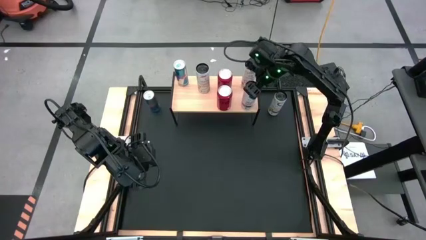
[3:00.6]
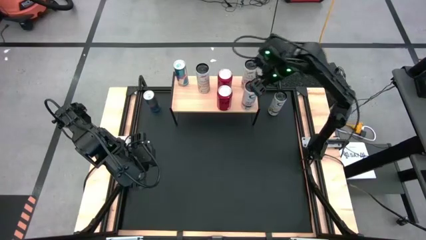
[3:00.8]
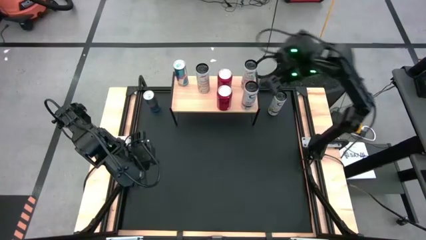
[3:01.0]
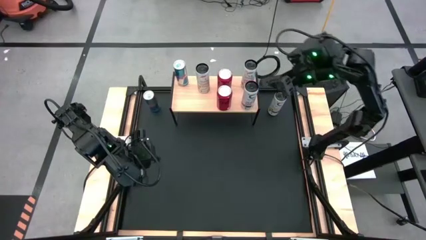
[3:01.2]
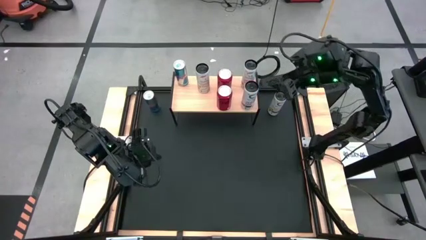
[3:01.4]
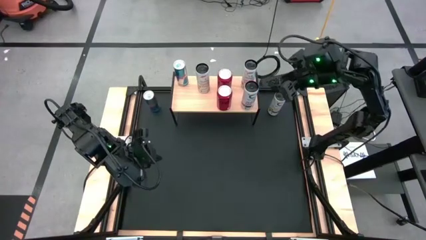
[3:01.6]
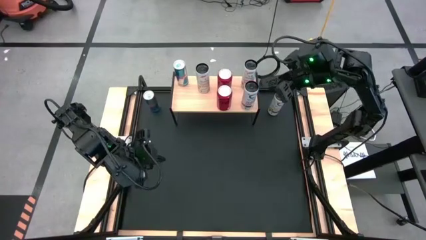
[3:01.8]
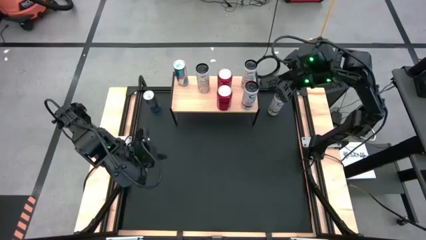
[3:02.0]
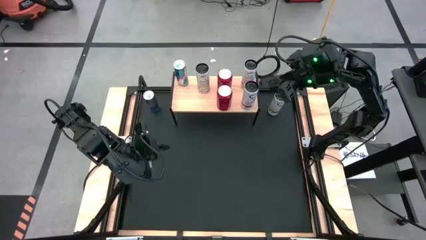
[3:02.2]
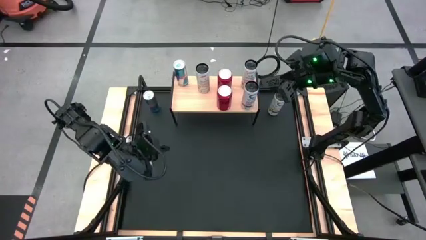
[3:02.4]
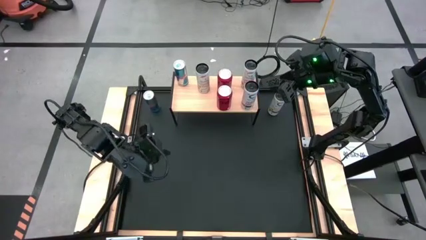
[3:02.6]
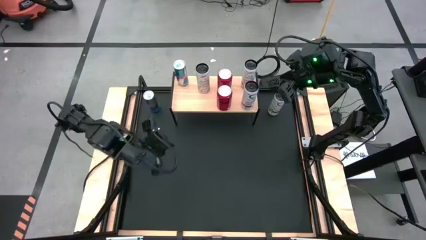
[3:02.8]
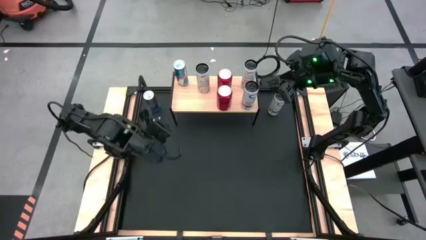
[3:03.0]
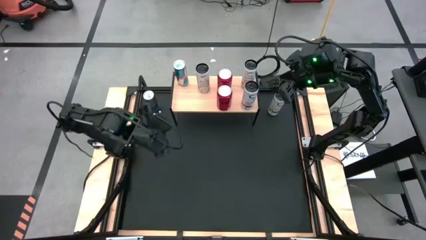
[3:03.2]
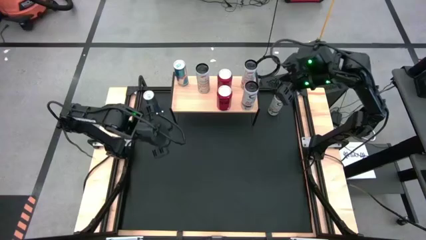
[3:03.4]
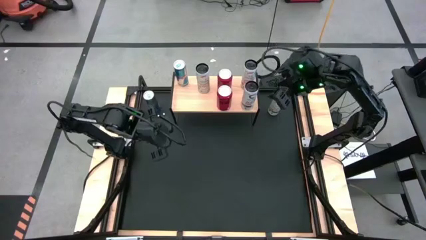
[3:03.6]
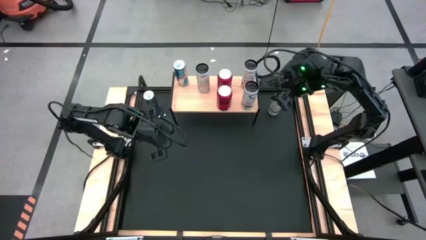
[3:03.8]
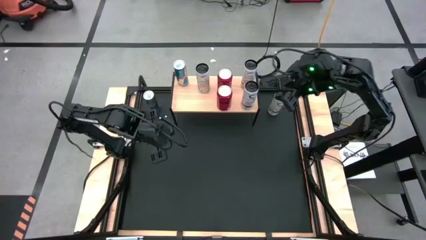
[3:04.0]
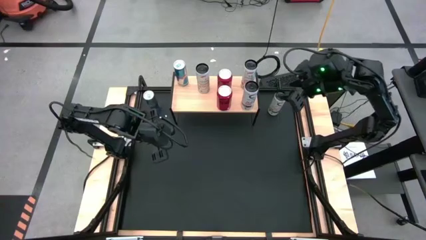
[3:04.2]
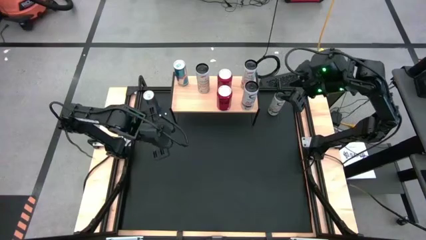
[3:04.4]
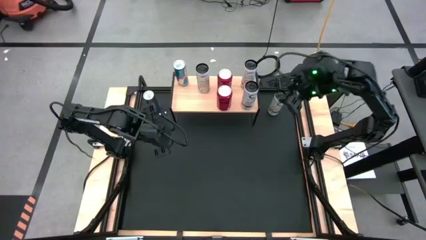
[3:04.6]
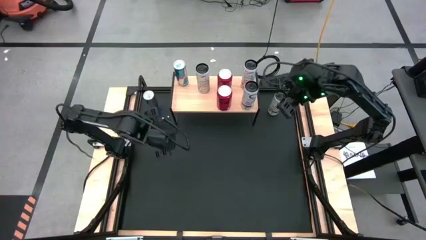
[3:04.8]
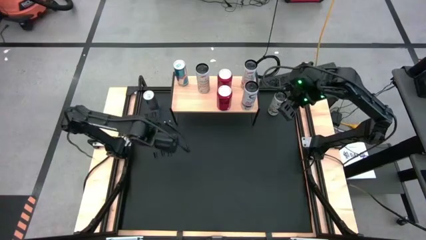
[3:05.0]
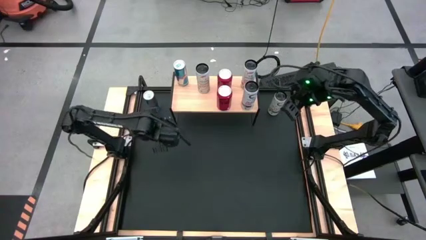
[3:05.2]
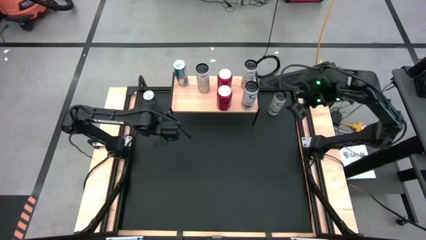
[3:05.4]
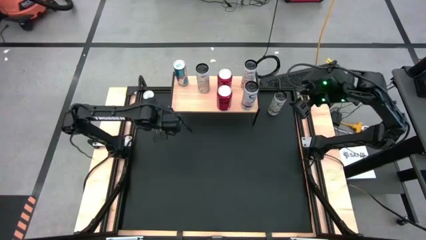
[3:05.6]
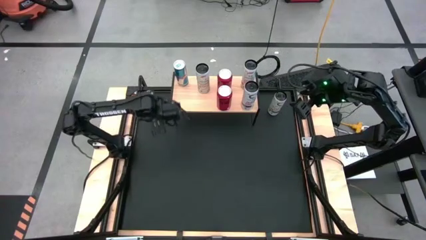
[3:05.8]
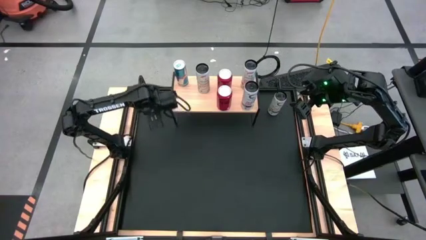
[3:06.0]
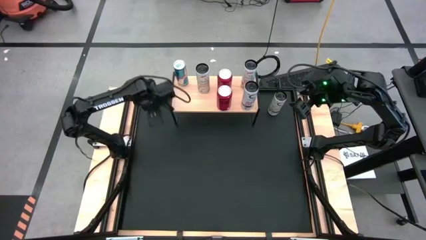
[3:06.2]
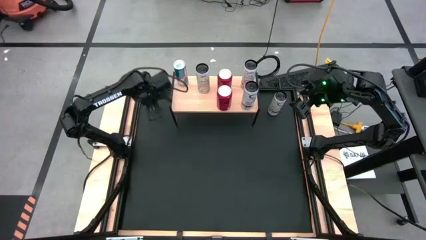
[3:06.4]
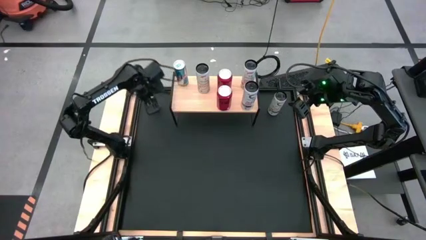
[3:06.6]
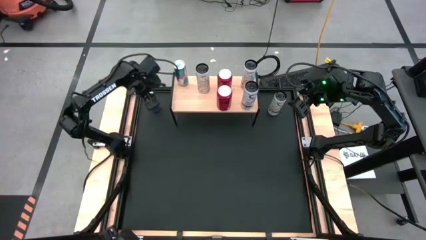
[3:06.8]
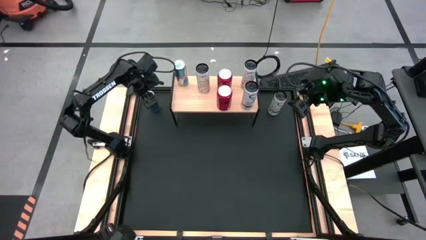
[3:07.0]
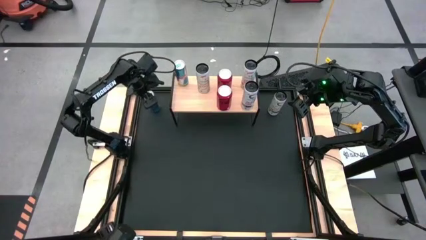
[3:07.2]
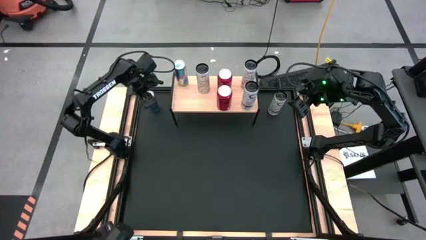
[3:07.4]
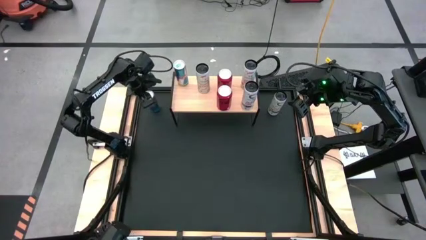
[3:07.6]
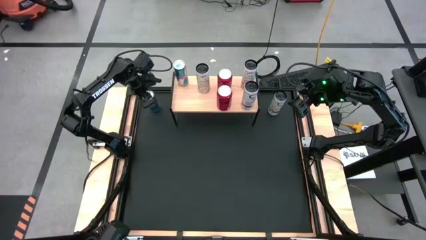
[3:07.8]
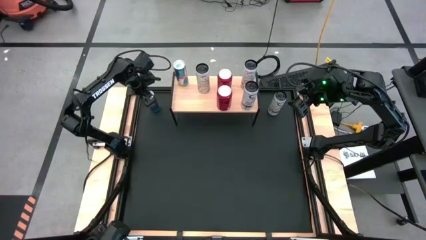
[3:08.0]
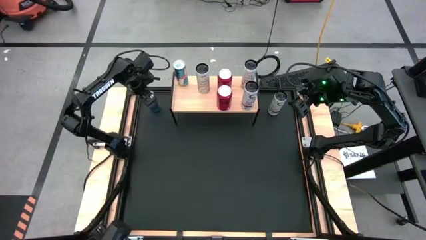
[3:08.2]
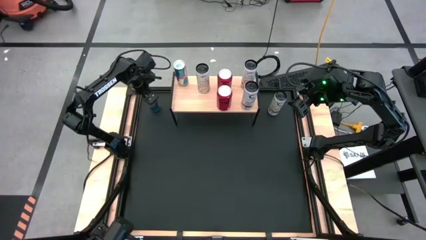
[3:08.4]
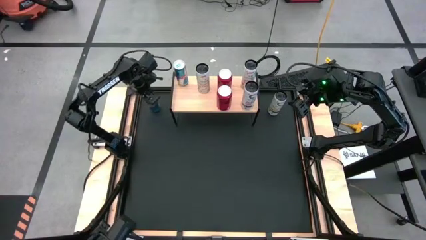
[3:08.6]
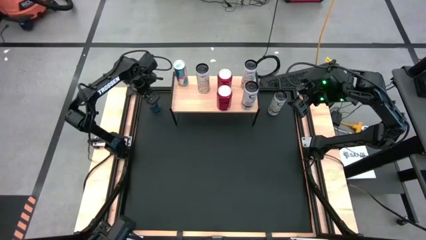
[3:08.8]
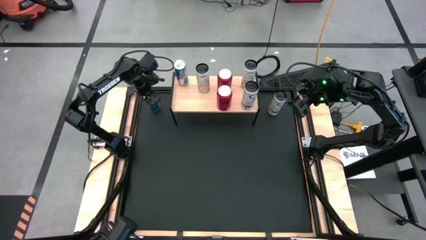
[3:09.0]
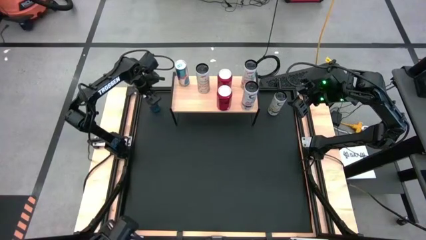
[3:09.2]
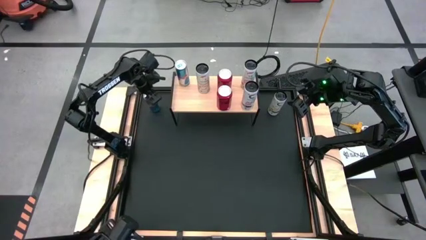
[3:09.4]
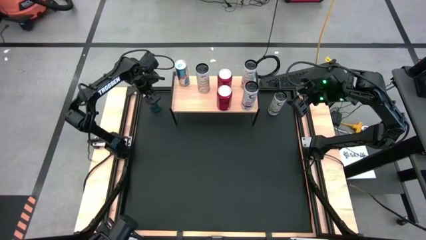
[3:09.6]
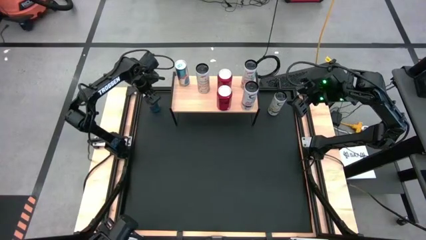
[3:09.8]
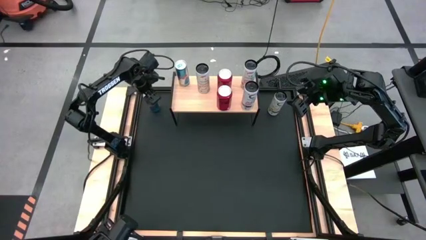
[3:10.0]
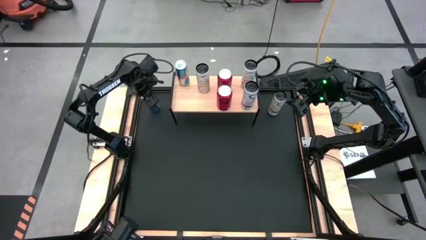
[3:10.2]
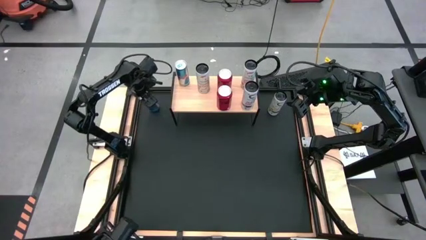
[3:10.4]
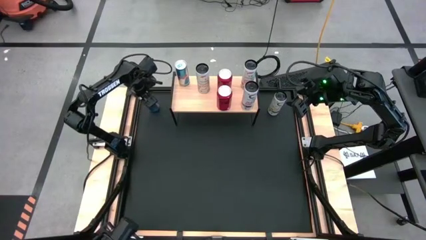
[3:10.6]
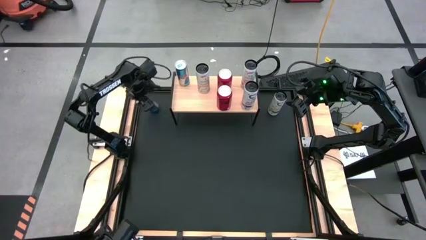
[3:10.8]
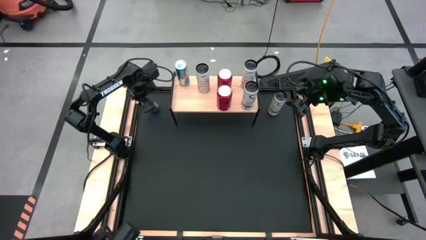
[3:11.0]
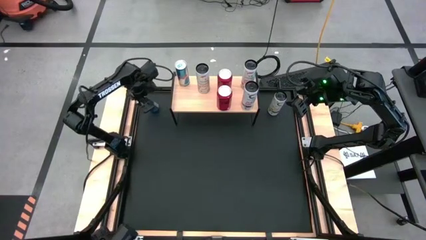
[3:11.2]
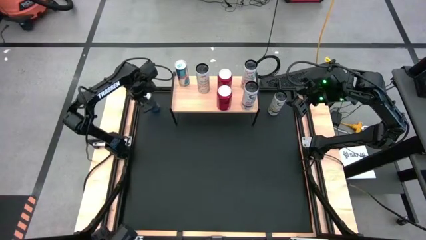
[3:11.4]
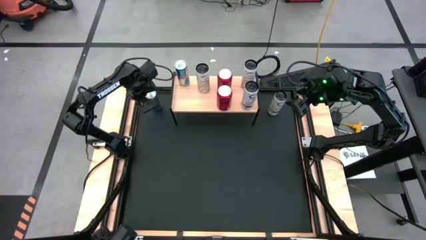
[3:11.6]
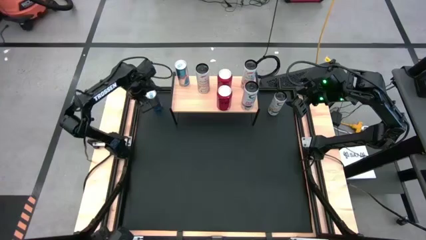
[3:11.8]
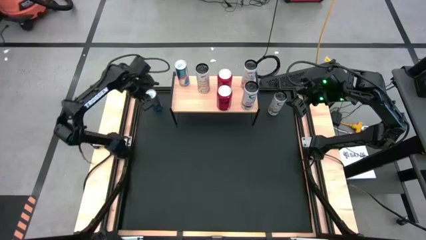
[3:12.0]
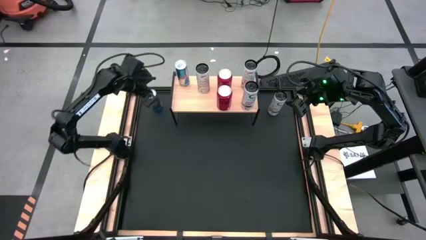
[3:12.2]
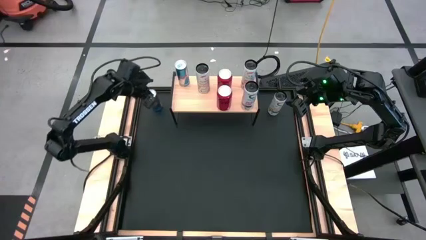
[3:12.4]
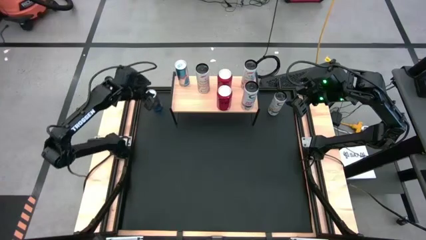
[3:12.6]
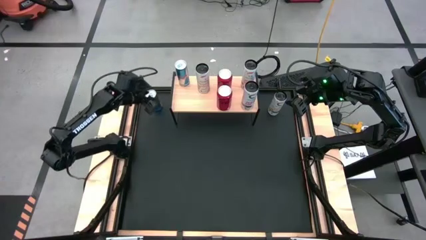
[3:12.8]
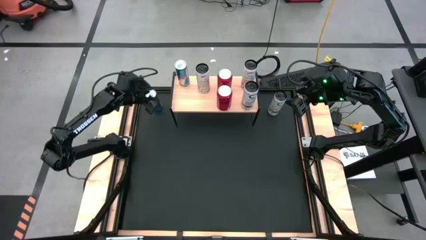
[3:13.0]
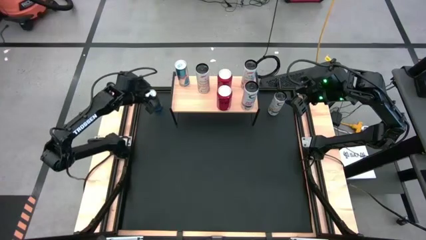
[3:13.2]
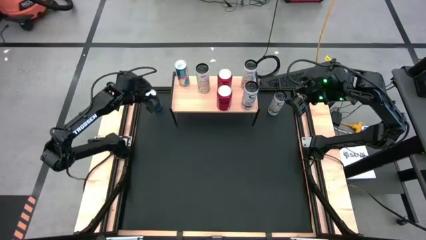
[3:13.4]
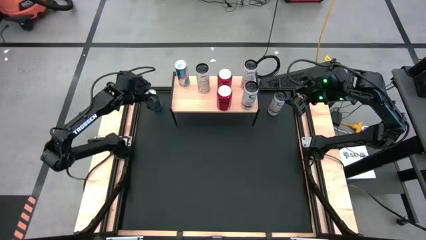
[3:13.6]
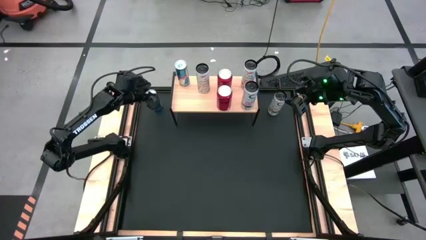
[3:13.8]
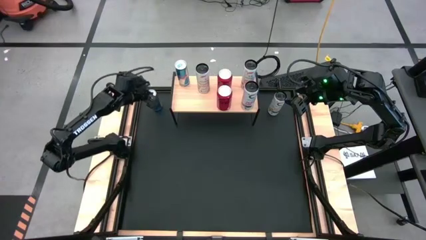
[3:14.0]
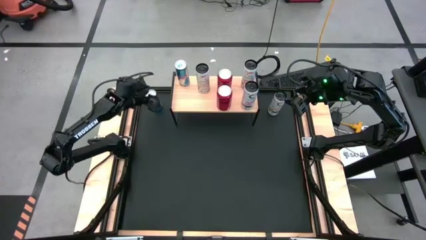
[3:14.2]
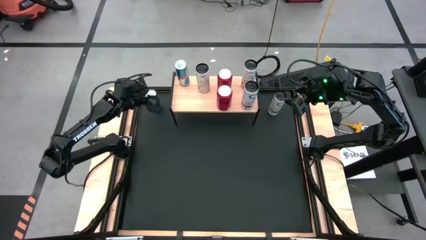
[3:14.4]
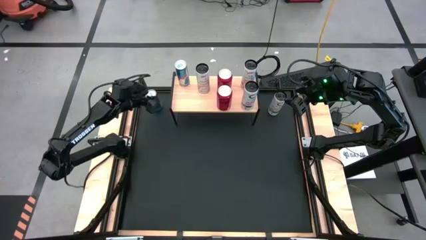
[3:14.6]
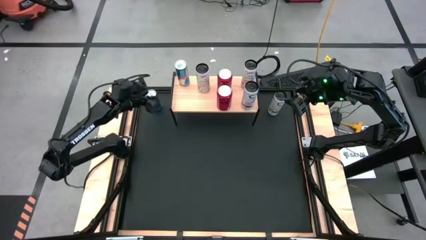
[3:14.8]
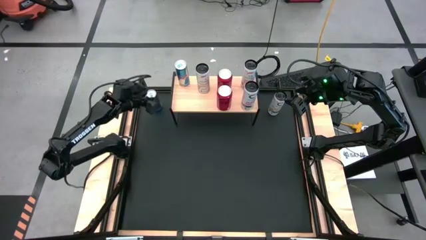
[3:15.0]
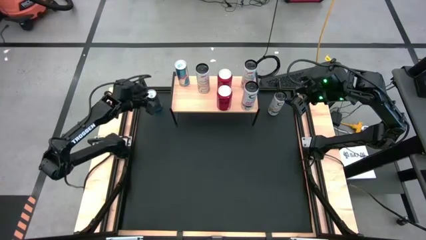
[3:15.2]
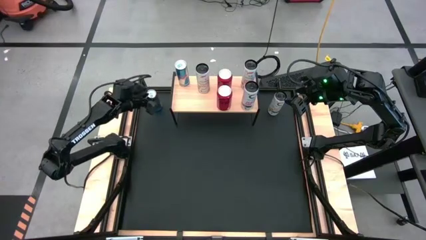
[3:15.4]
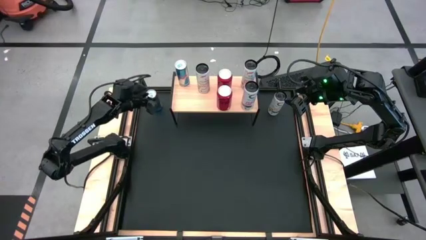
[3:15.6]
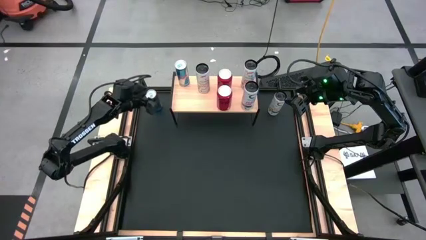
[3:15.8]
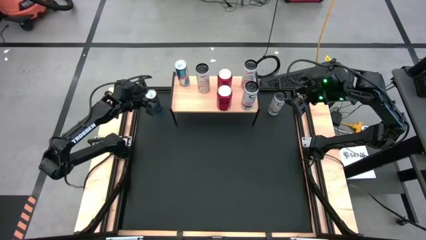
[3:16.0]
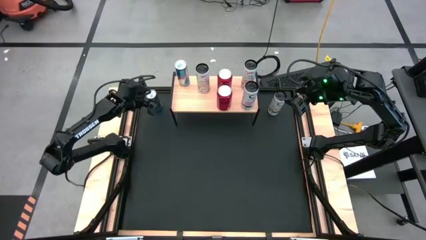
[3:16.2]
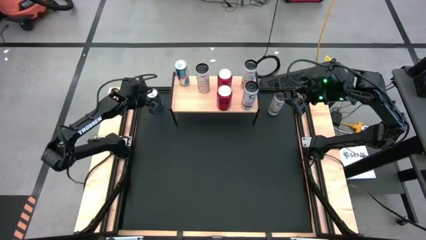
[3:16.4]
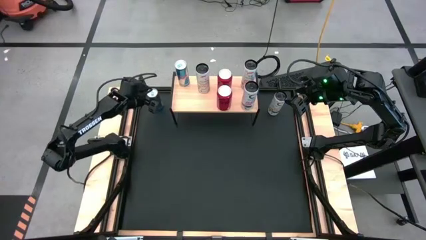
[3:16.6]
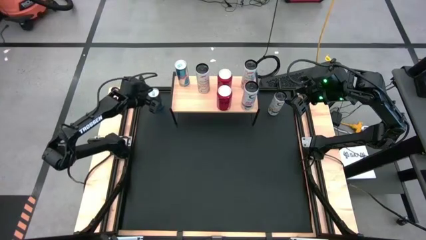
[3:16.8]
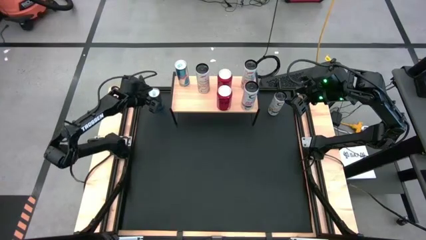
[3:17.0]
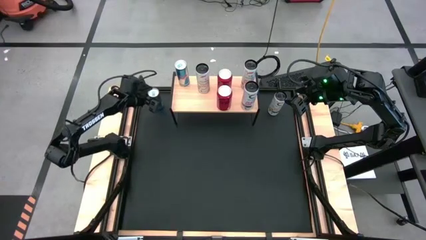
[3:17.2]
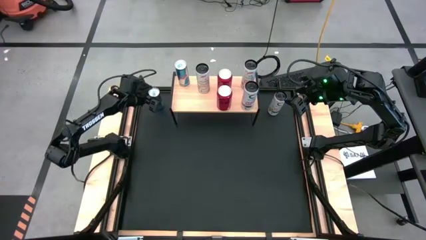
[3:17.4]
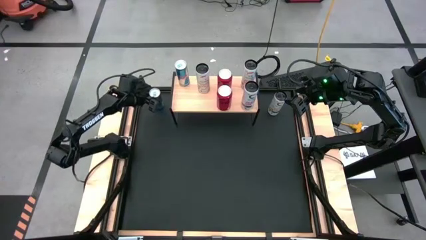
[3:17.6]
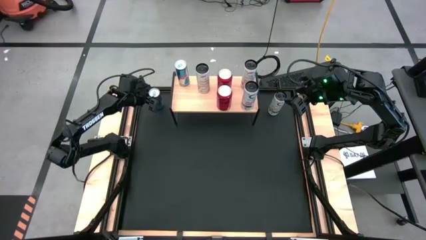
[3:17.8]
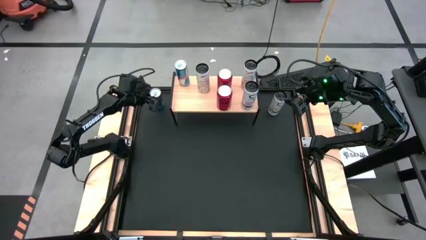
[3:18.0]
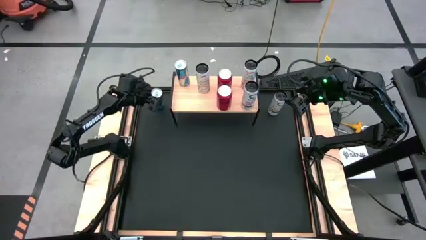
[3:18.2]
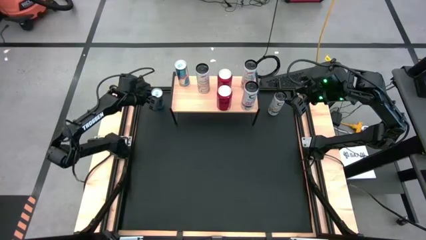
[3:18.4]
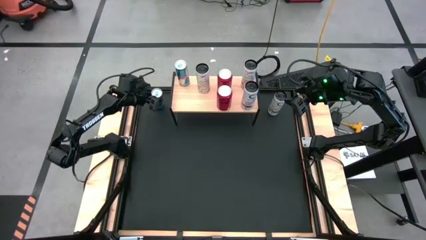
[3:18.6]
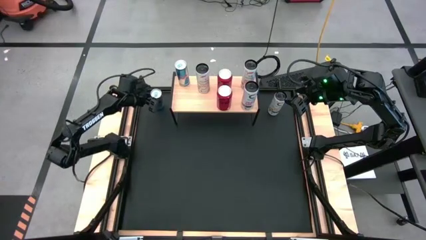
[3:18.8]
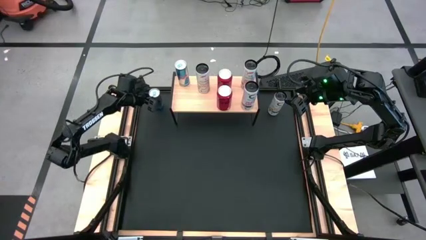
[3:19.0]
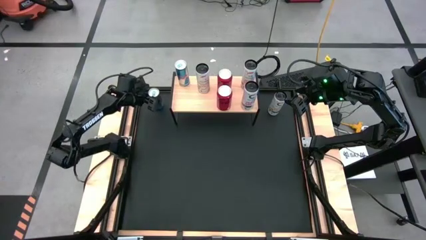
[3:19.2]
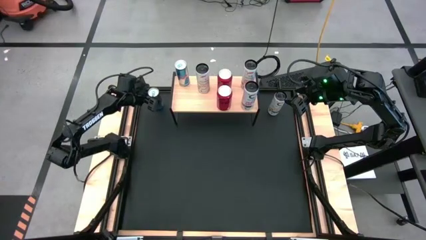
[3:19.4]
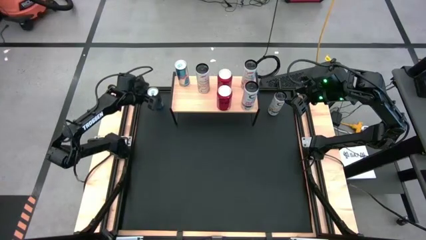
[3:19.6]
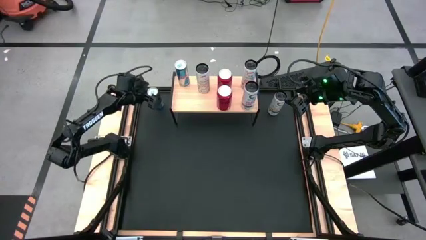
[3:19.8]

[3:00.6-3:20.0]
Task: Place canned beverage on shelf
Put the blue soda can on the shelf aligned with the other blue soda can
